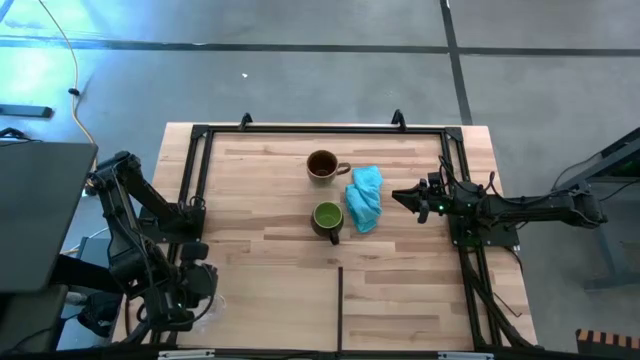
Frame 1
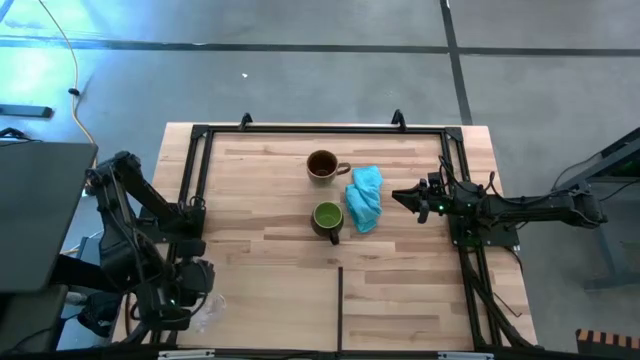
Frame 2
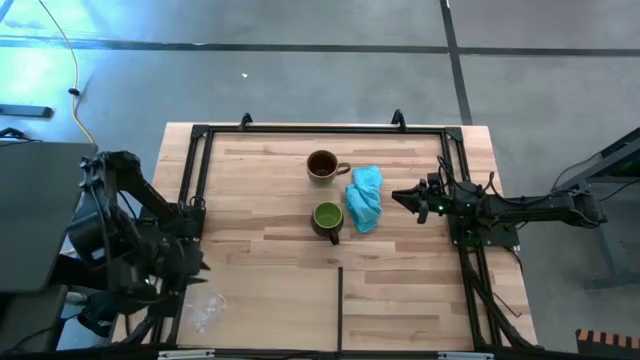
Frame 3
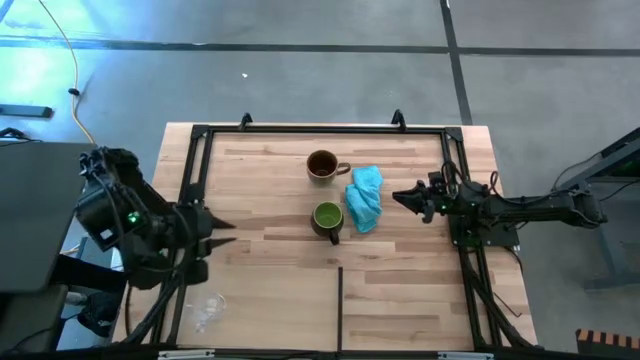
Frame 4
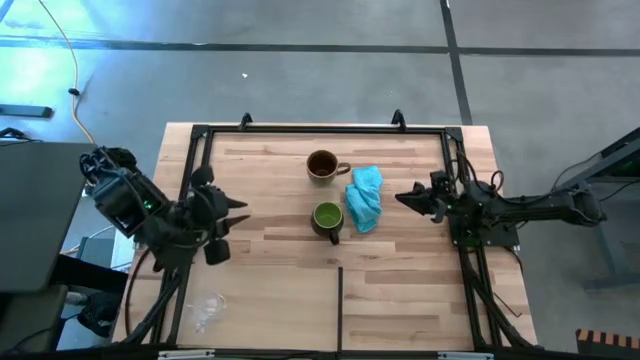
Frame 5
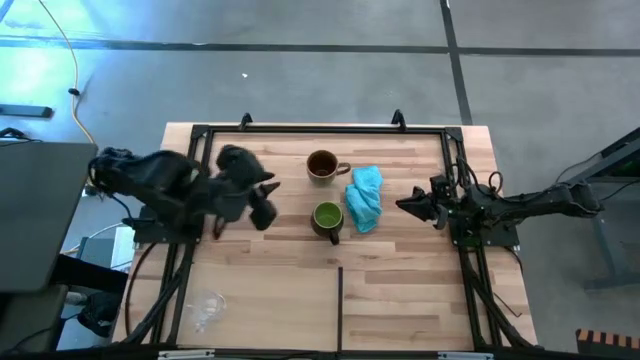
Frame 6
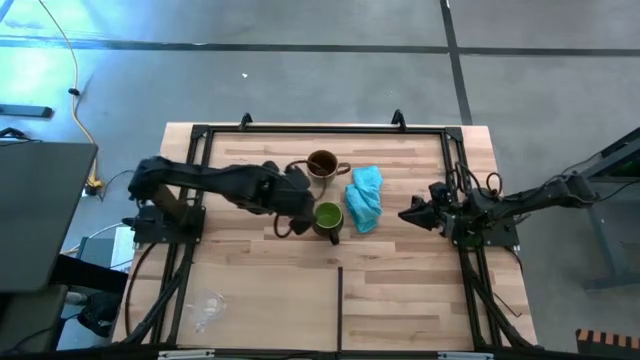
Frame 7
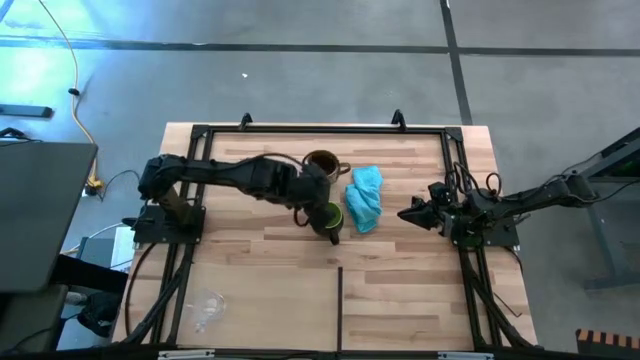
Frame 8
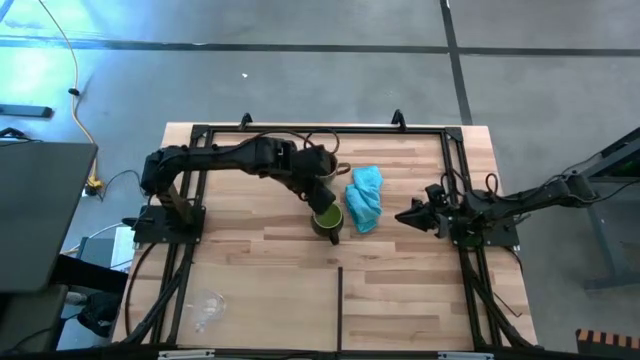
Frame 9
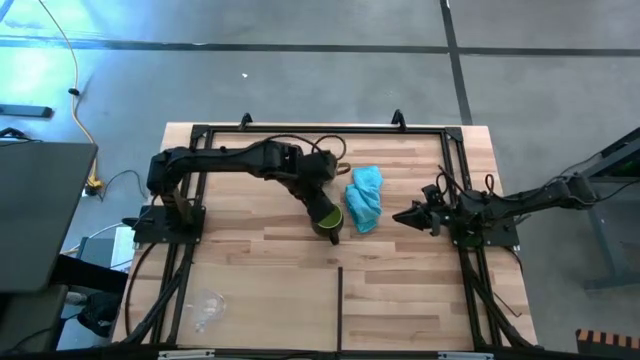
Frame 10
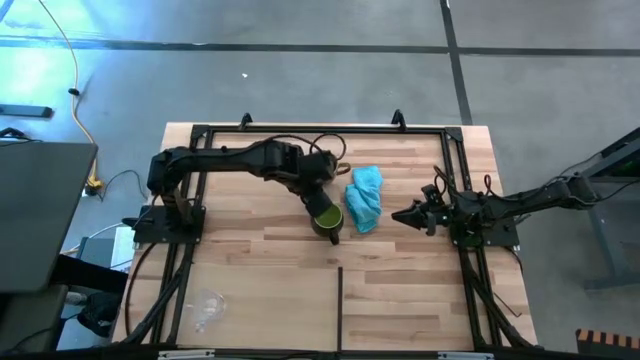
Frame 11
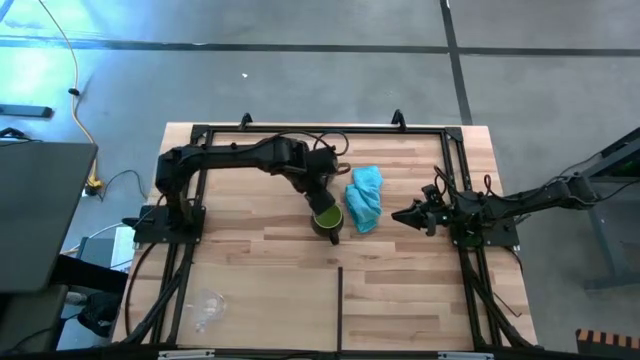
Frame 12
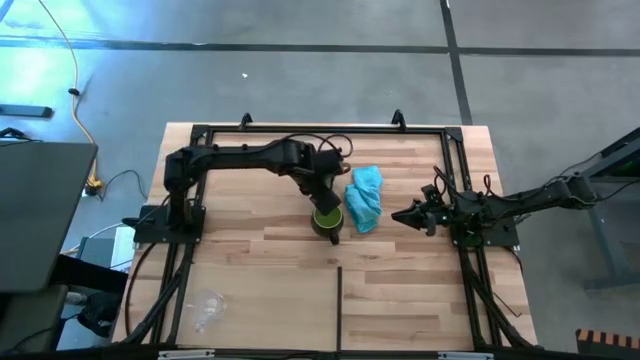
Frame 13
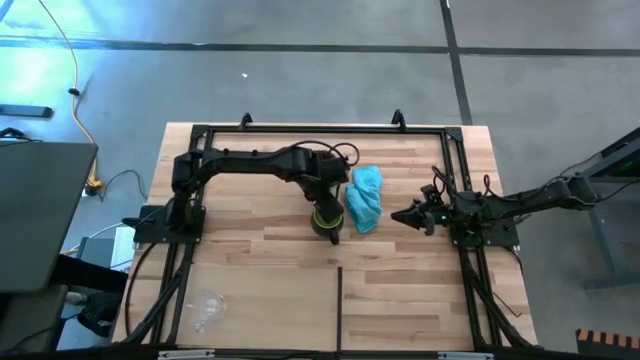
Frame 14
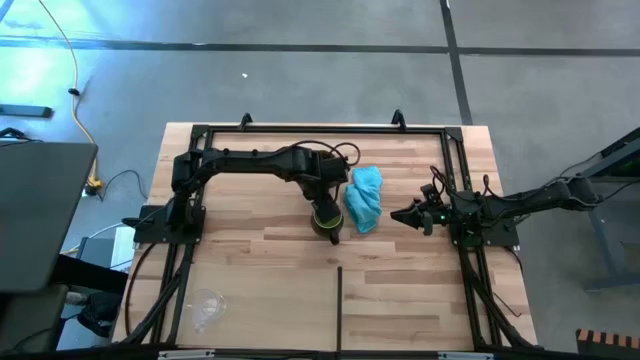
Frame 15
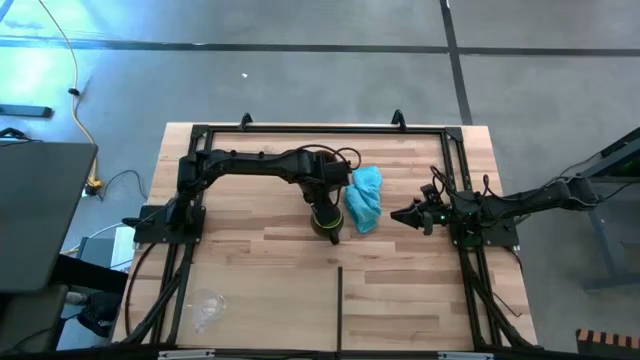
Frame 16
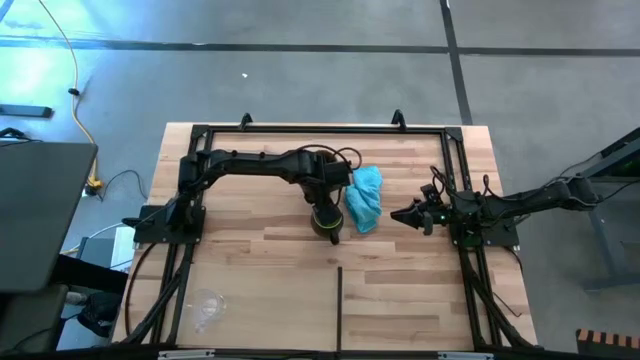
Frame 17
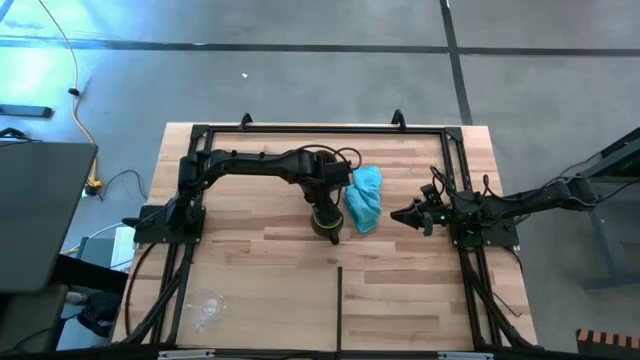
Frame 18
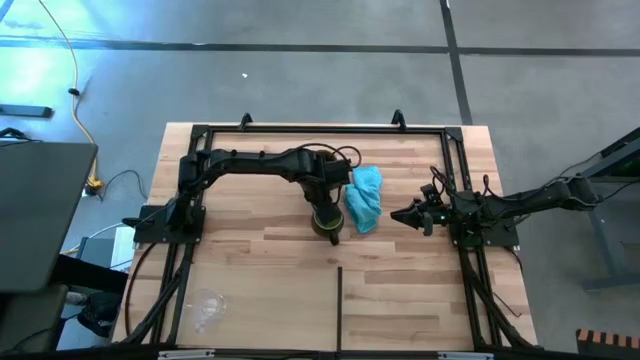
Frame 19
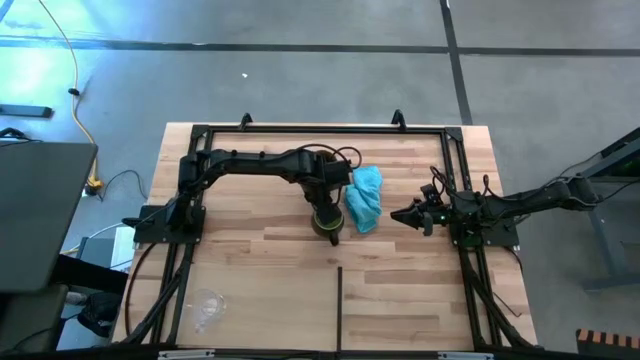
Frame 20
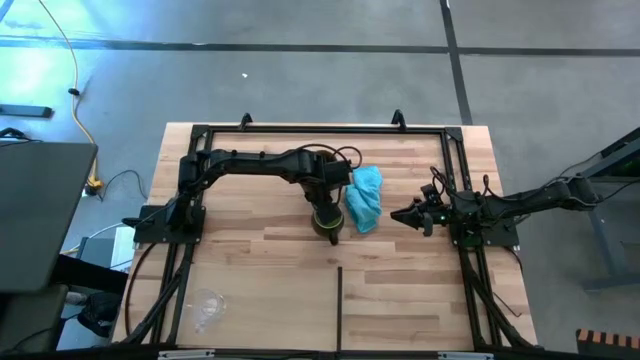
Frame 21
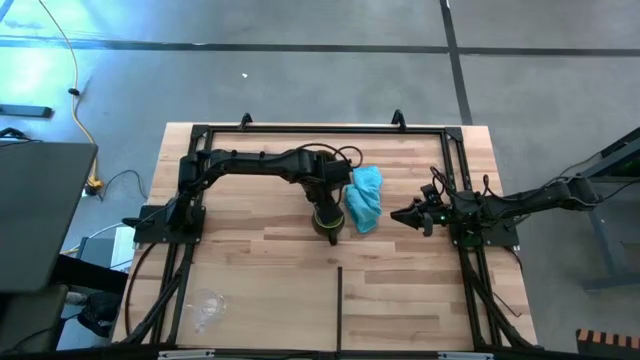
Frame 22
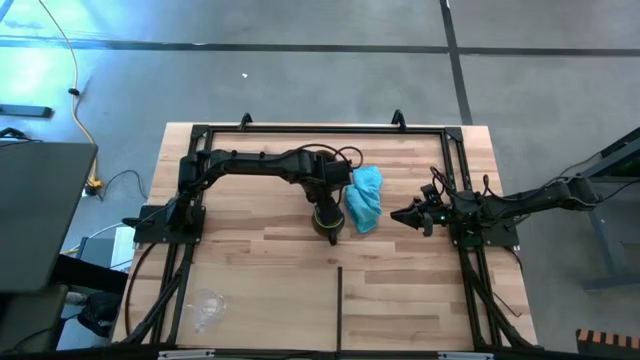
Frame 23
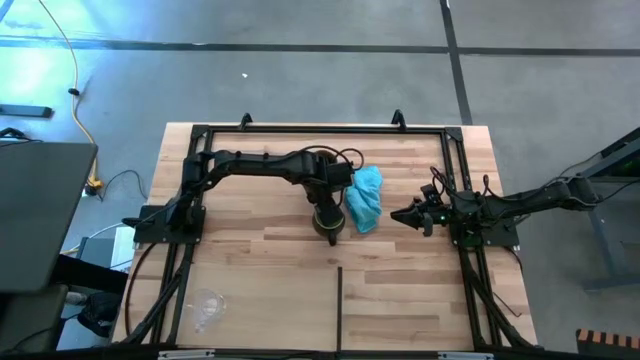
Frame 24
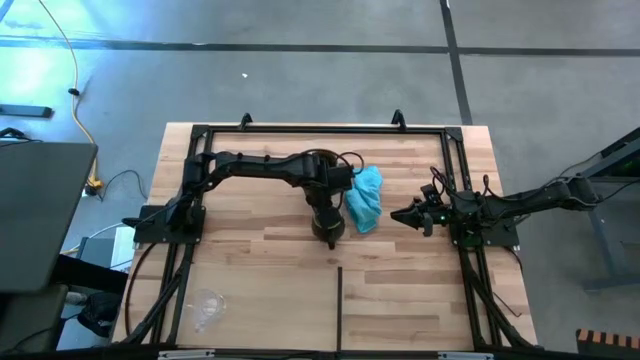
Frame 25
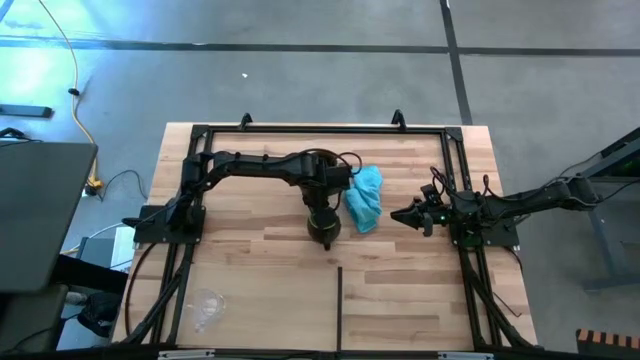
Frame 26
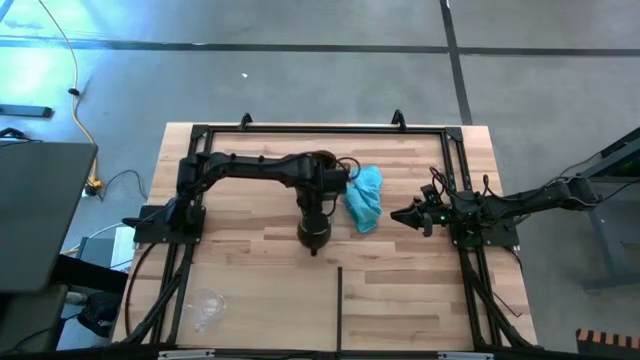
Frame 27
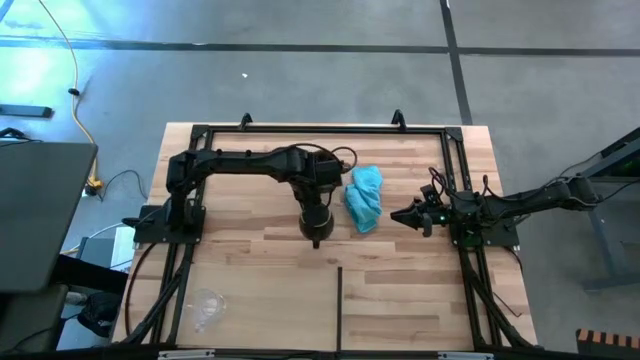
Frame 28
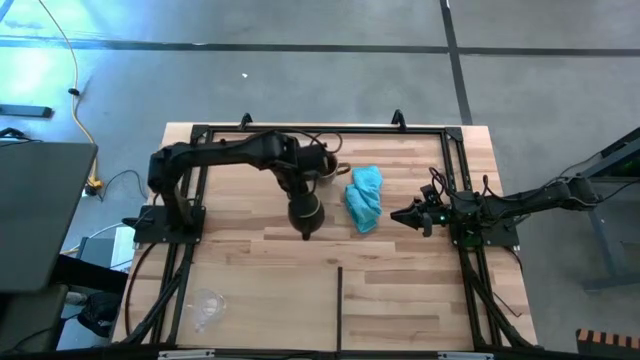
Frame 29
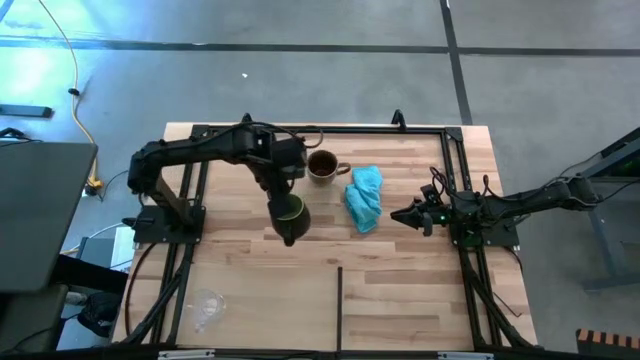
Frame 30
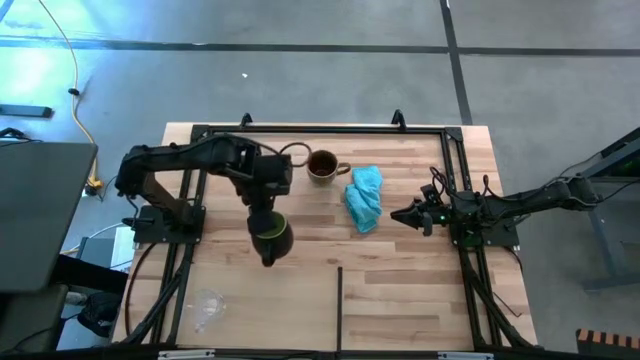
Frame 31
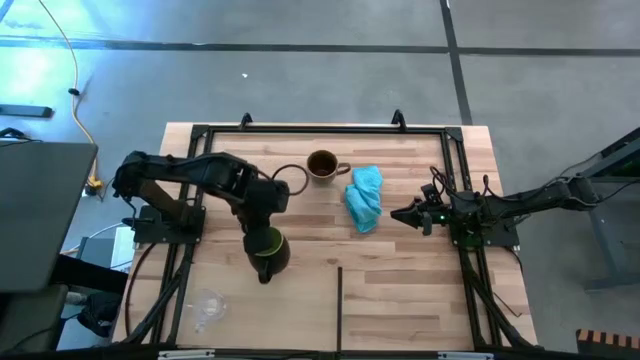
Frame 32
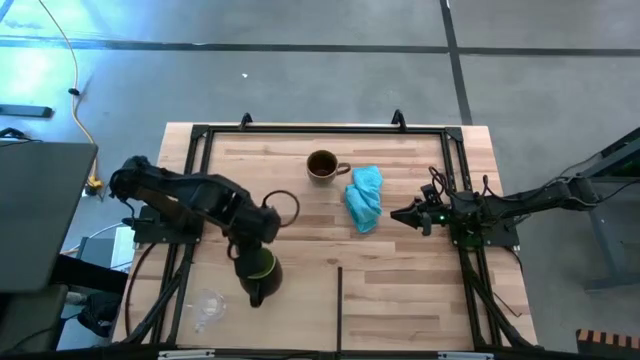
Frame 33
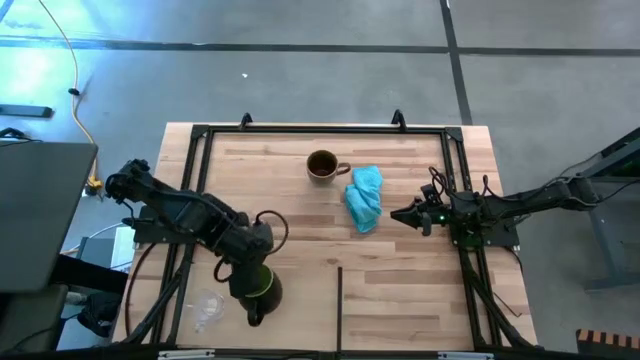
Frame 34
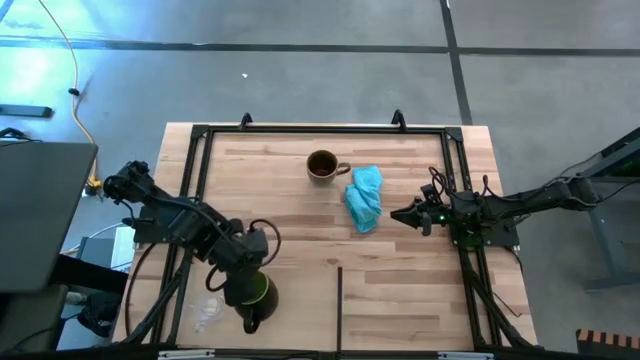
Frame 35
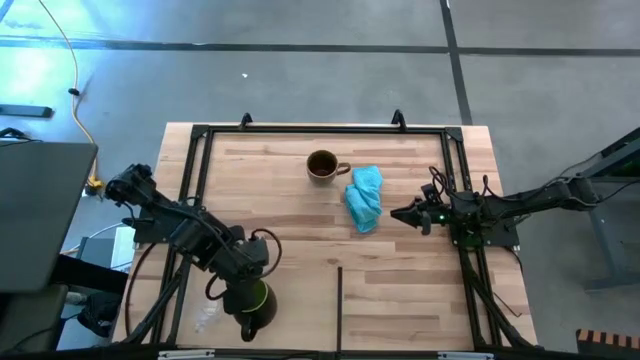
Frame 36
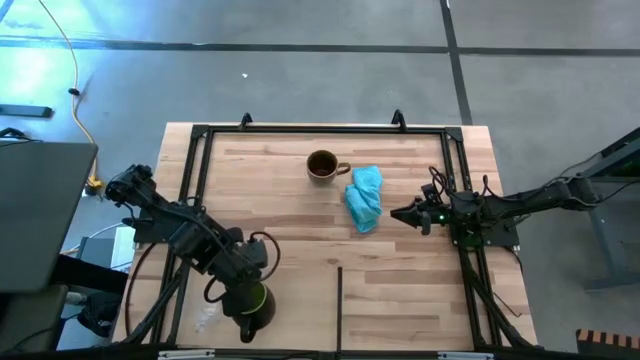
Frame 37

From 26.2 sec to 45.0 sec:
Task: Stack small to large cups/mugs on shelf
Put the black mug on the shelf
